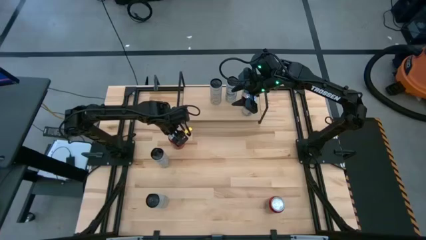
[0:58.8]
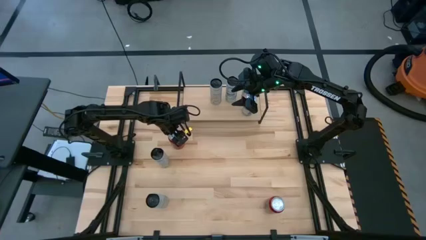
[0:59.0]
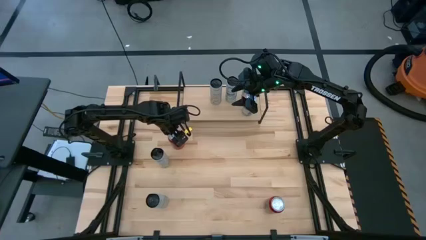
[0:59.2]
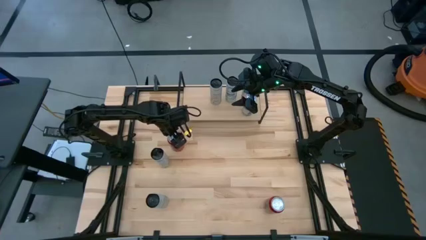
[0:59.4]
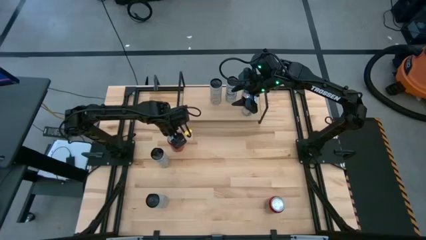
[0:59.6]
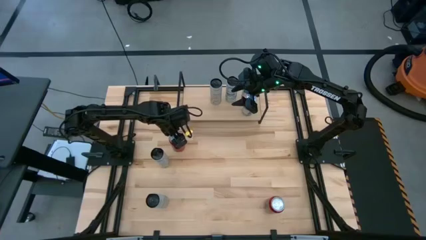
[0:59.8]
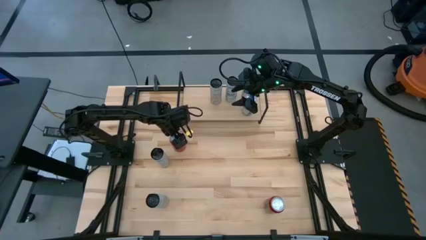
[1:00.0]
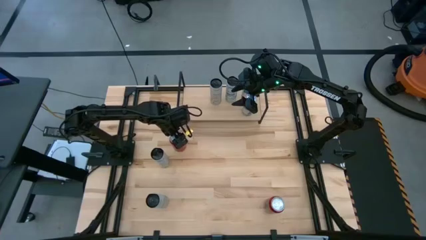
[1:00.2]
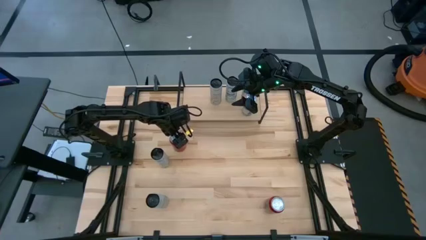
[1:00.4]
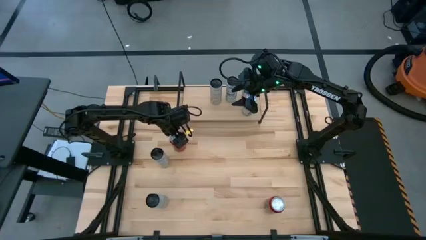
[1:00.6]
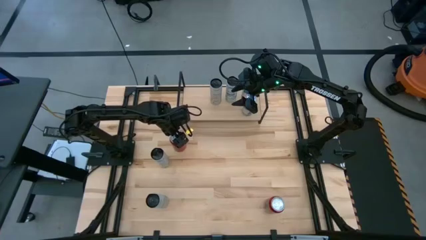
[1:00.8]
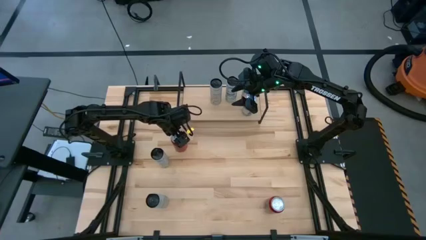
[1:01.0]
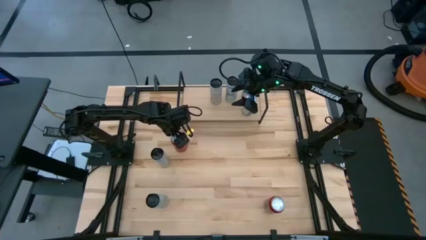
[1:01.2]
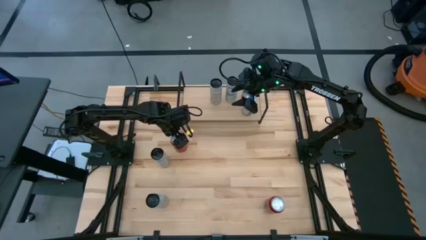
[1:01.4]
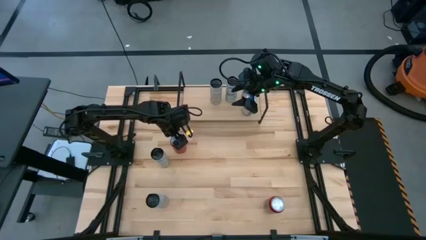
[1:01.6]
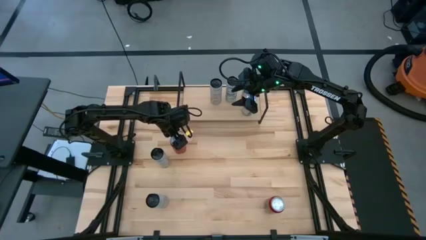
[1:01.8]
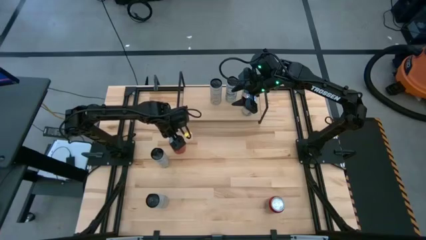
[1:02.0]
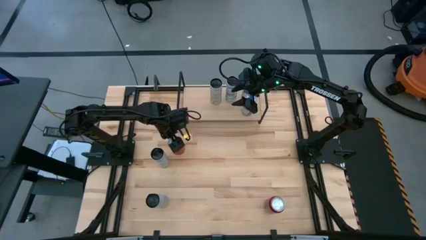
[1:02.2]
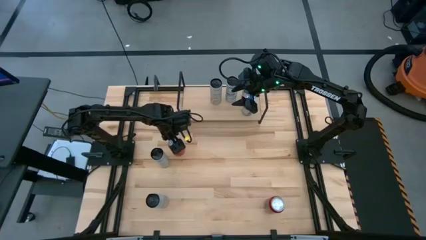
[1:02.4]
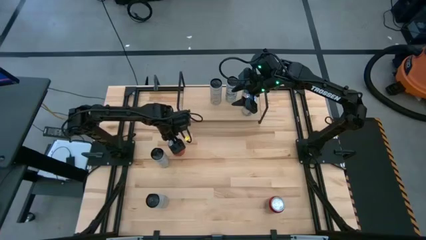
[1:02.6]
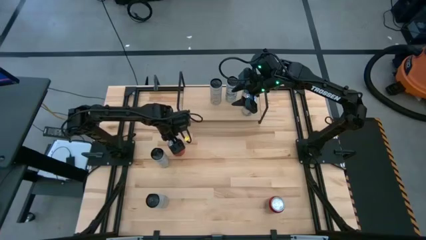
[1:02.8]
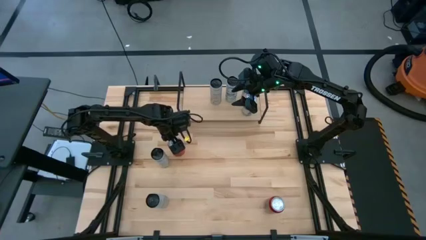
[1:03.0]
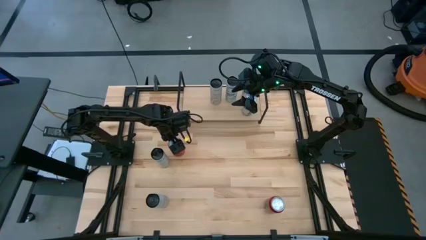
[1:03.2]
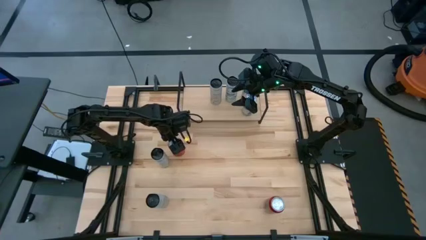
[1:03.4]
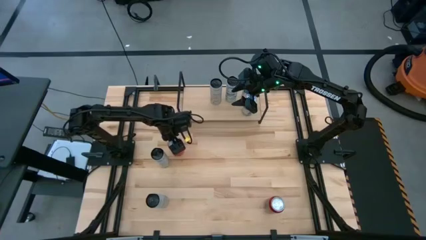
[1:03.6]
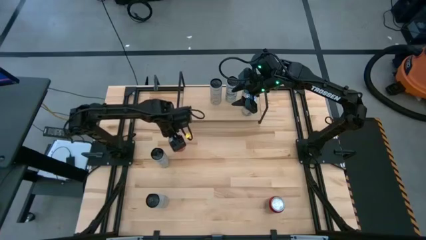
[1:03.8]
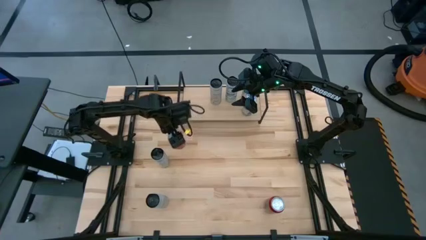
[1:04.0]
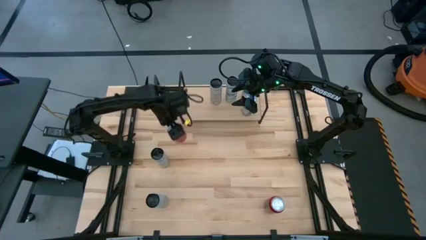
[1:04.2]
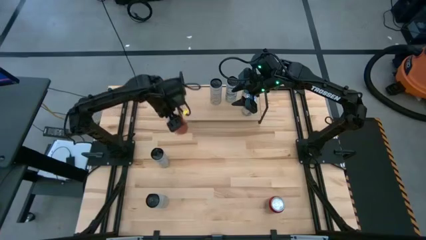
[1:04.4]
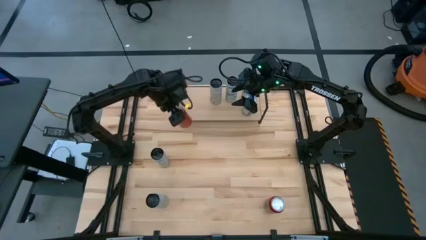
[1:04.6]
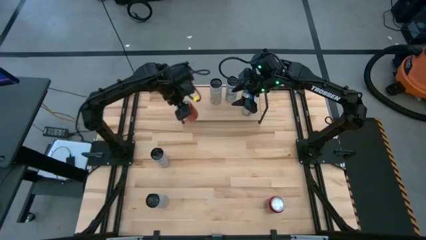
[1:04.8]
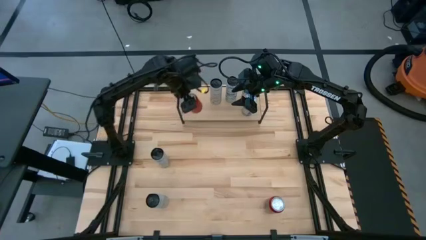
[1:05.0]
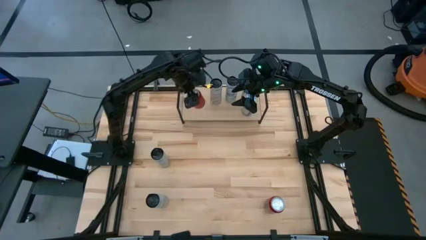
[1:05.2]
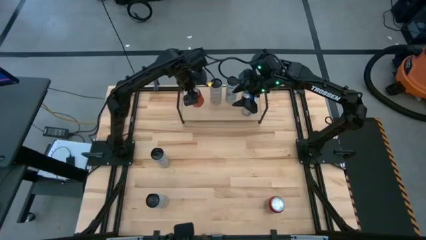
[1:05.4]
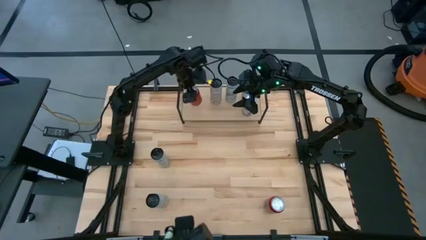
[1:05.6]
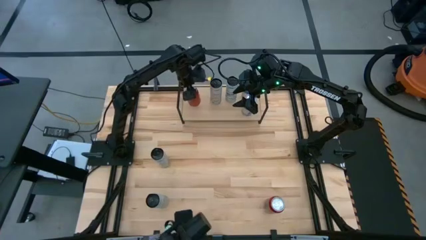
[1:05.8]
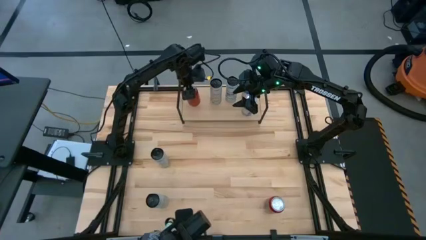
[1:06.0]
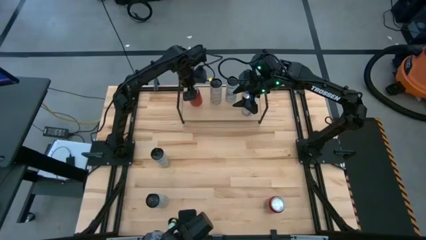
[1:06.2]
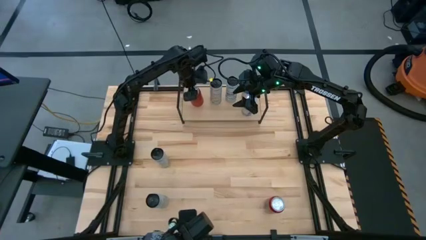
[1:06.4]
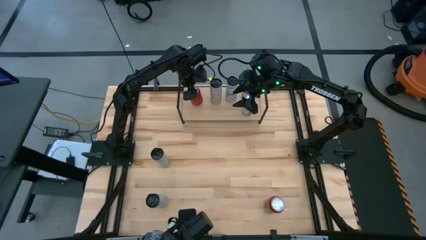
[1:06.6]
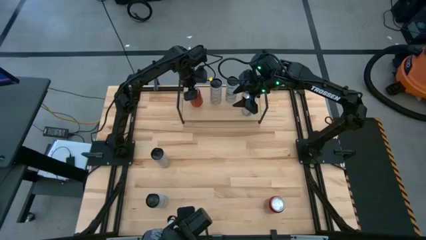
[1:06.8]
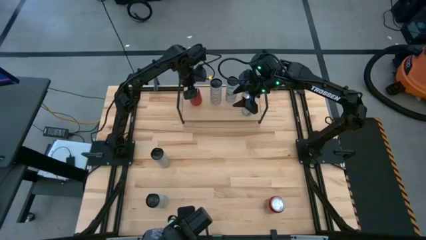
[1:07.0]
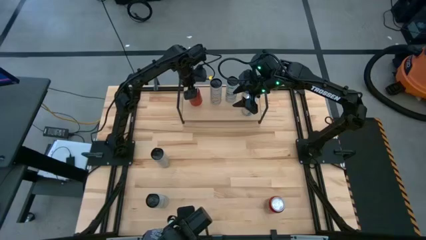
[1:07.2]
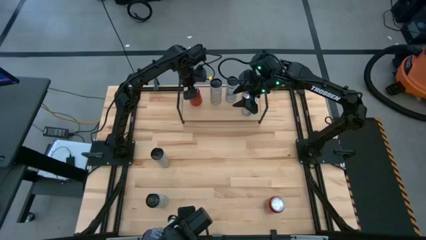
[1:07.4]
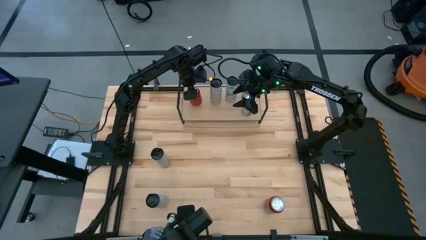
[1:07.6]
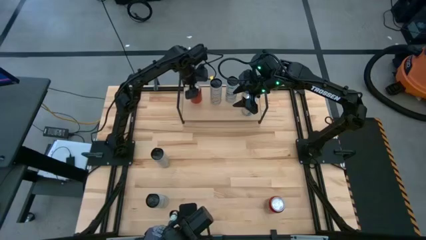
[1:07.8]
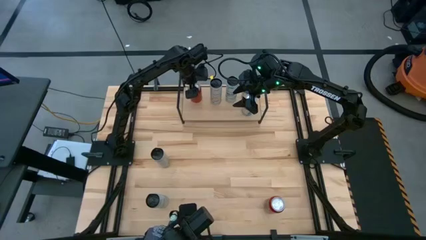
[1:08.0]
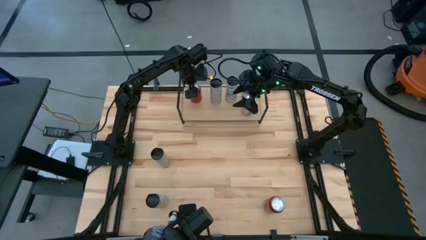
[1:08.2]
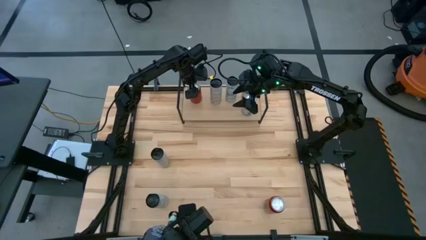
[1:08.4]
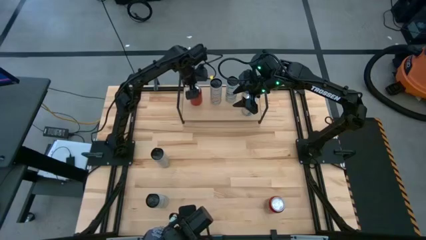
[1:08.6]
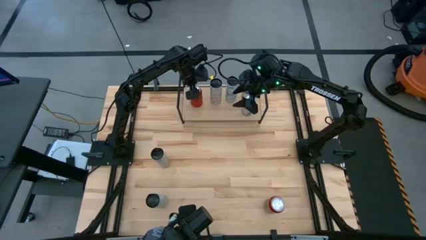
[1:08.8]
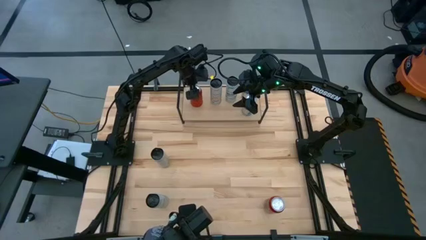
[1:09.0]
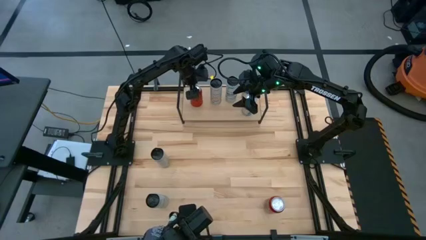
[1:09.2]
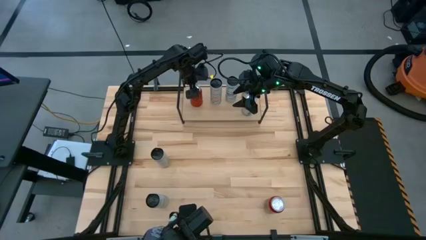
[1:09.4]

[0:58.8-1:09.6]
Task: Place canned beverage on shelf
Put the top red soda can on the shelf aligned with the other black soda can

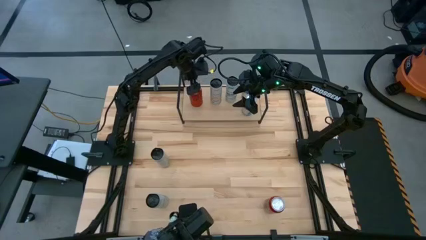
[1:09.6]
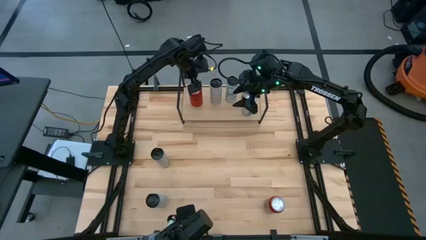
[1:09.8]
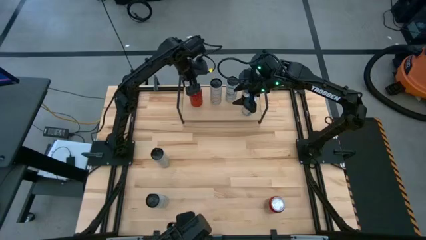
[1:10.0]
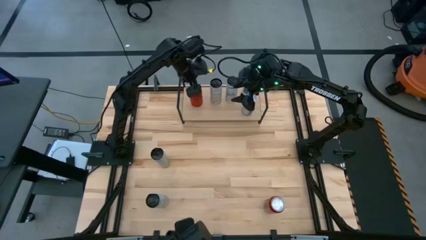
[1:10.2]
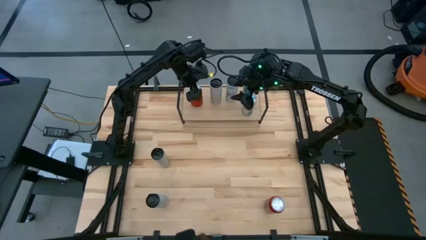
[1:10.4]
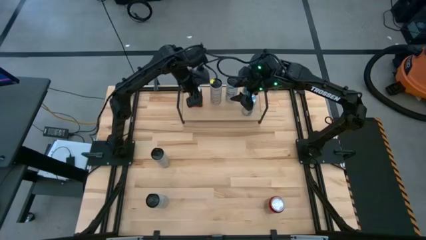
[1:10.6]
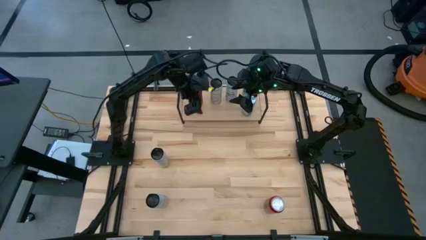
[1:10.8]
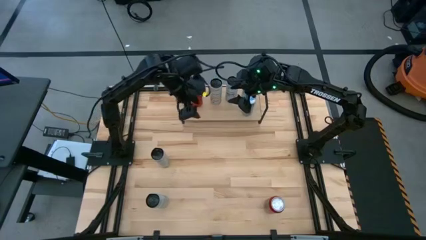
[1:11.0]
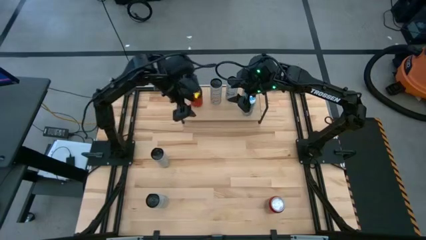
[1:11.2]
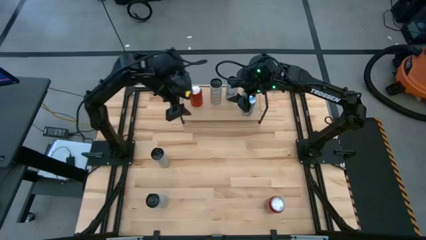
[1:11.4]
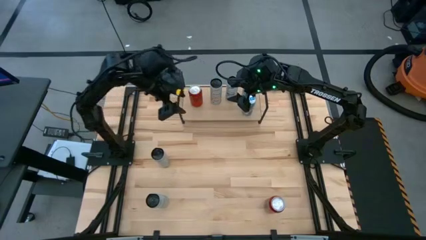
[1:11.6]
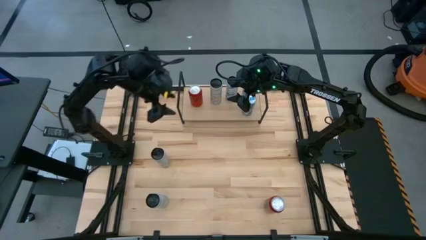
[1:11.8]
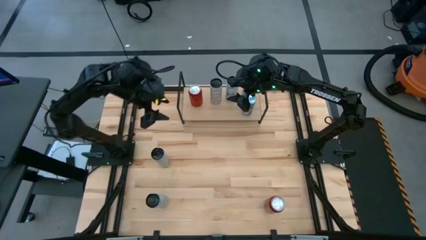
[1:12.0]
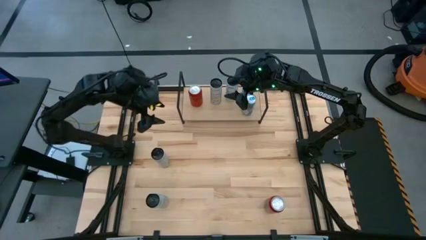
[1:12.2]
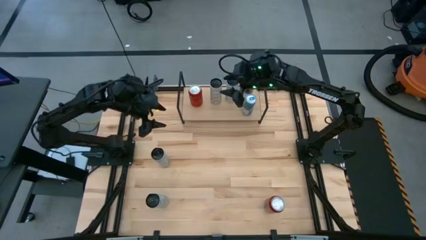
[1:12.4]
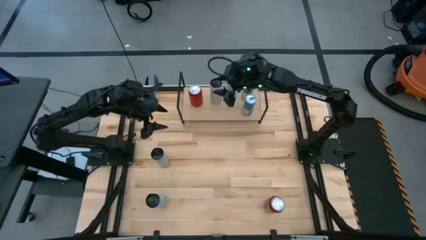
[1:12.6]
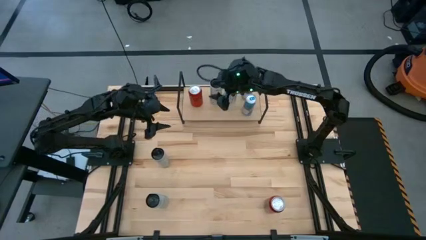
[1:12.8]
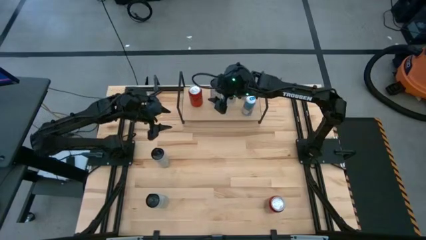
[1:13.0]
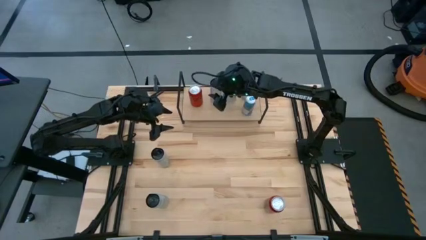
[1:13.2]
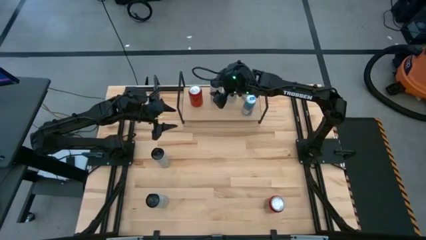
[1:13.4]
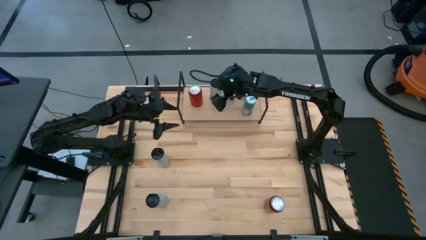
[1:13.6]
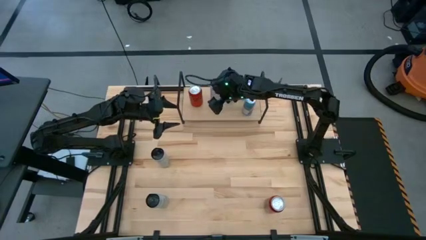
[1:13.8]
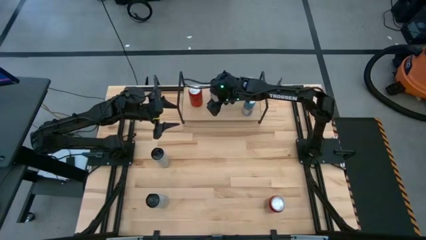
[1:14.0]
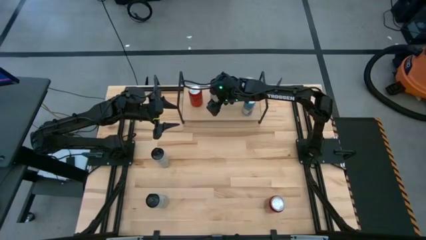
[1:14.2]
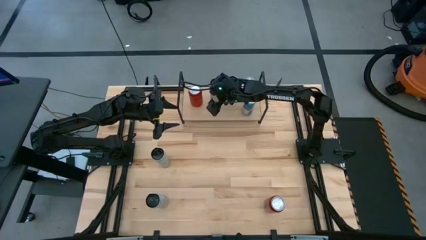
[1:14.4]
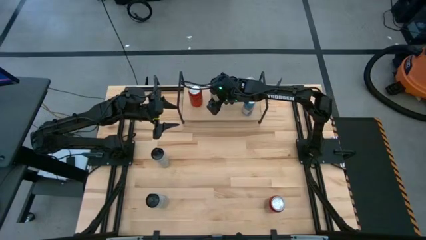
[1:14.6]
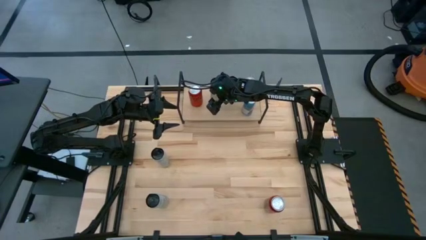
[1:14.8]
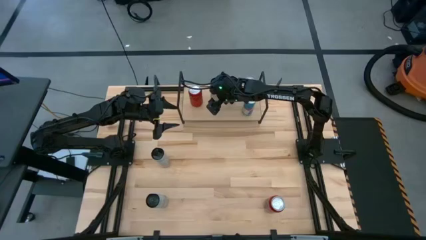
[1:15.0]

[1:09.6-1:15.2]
Adjust the black soda can on the shelf
